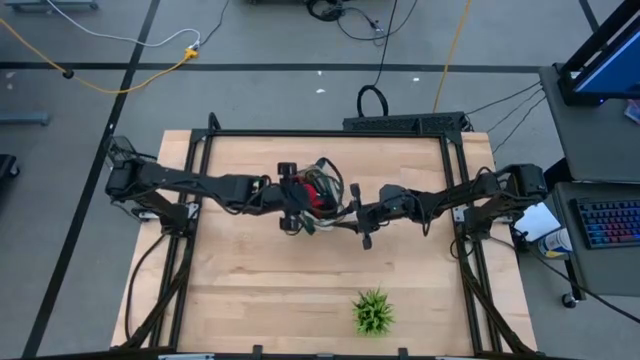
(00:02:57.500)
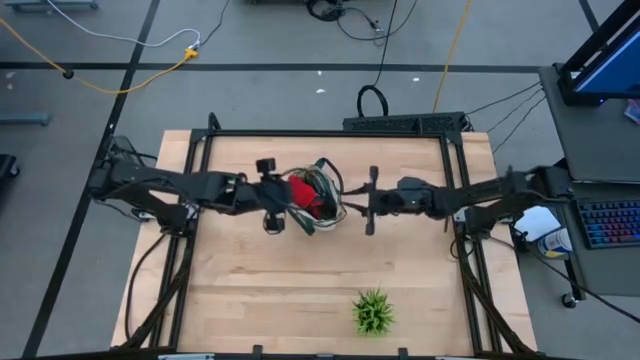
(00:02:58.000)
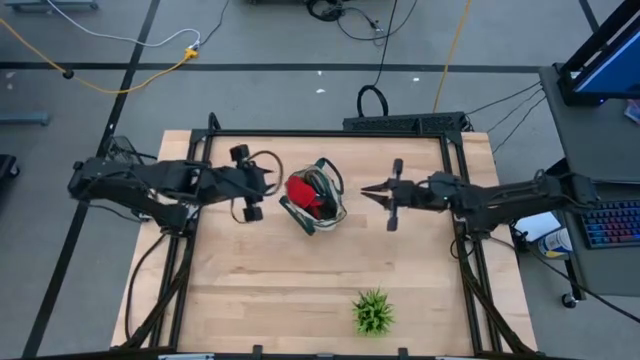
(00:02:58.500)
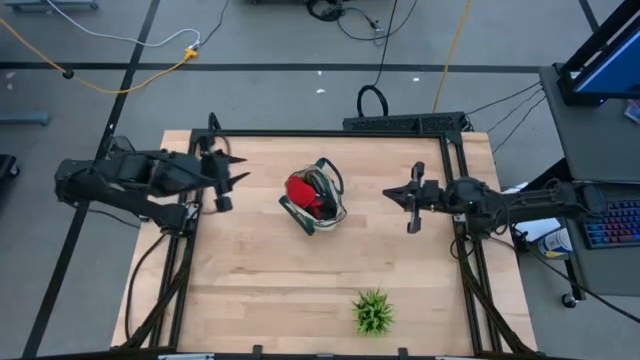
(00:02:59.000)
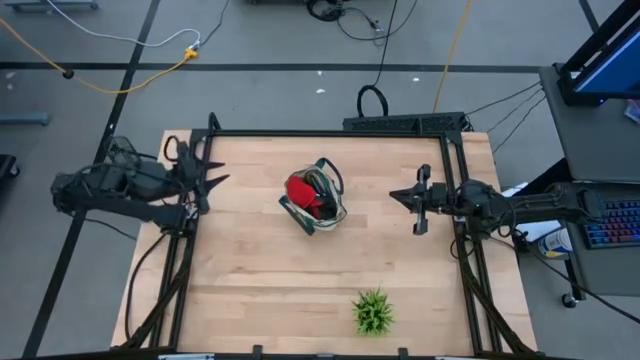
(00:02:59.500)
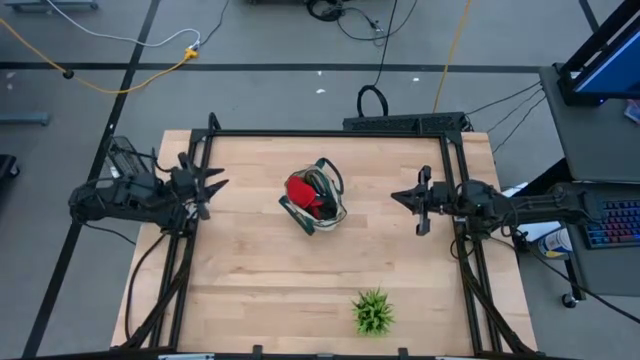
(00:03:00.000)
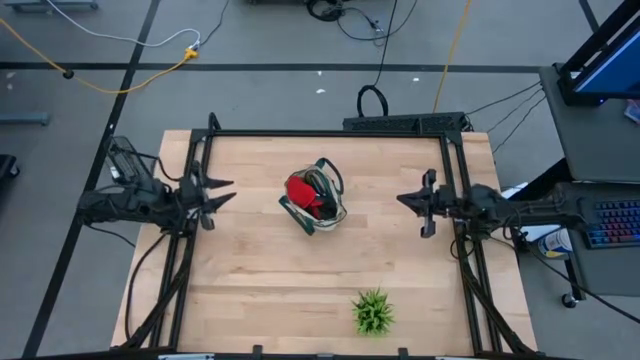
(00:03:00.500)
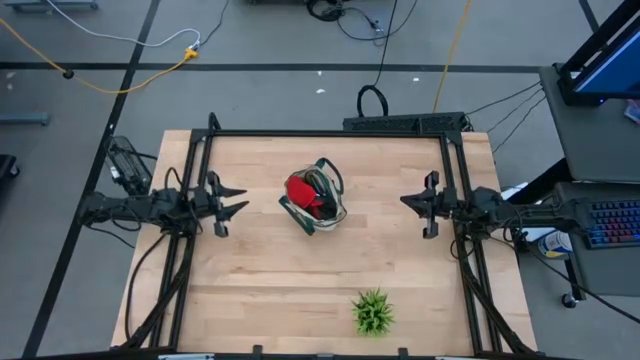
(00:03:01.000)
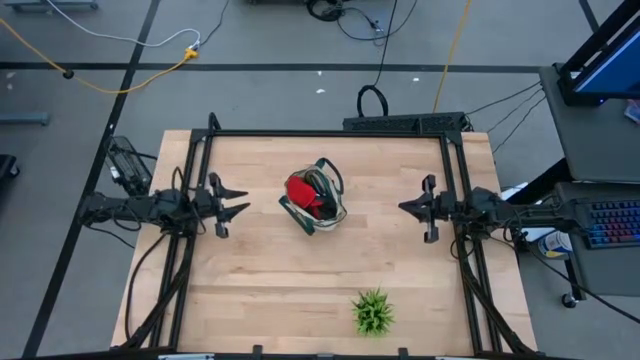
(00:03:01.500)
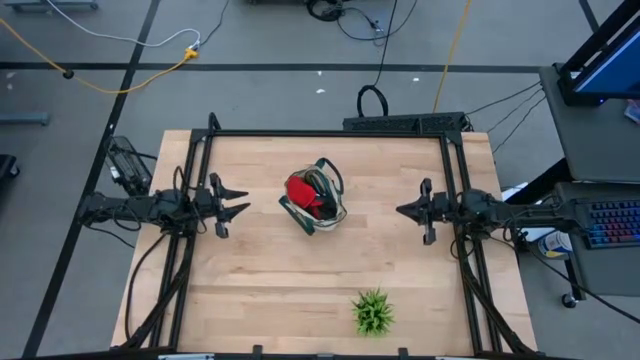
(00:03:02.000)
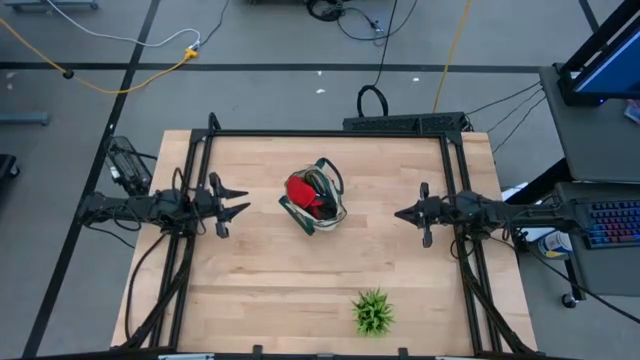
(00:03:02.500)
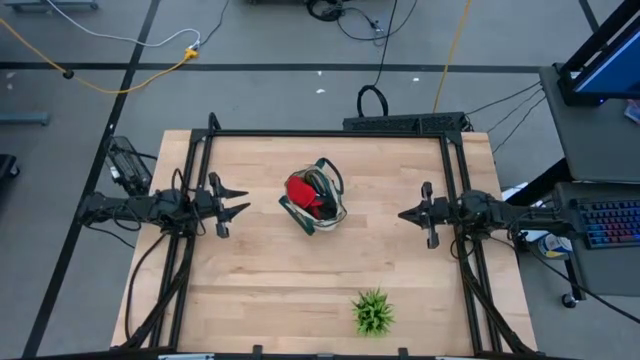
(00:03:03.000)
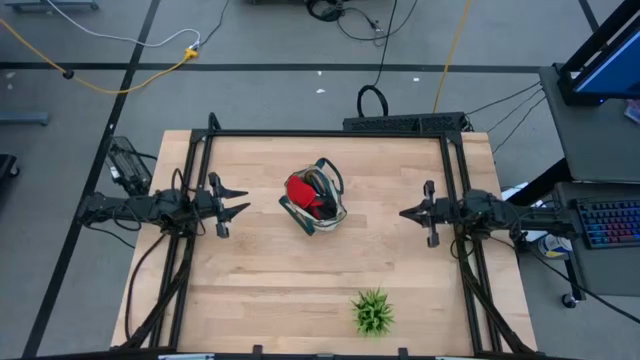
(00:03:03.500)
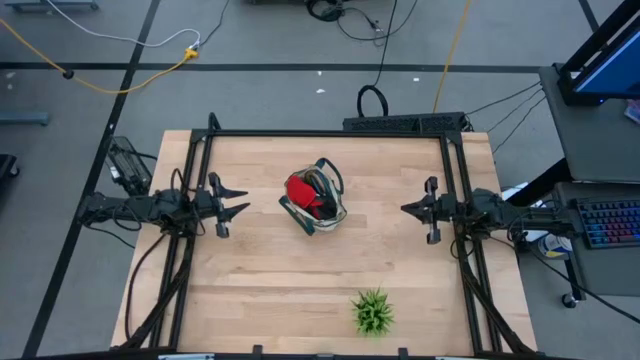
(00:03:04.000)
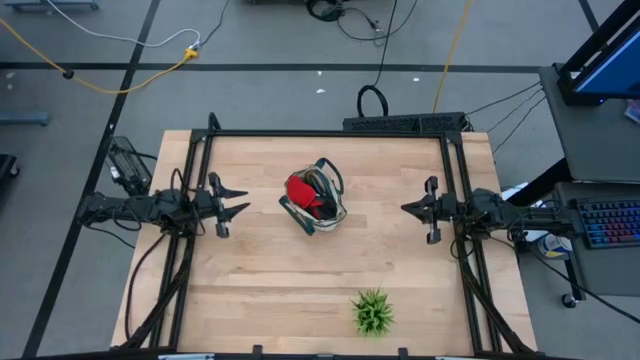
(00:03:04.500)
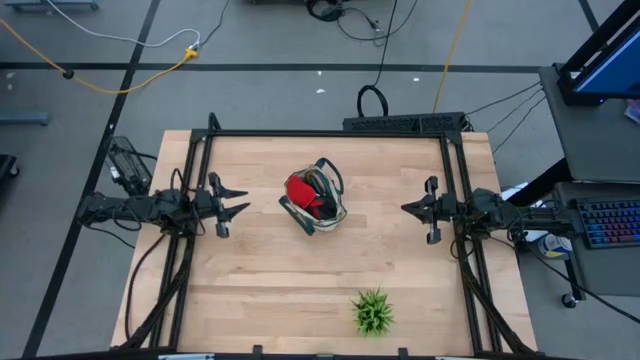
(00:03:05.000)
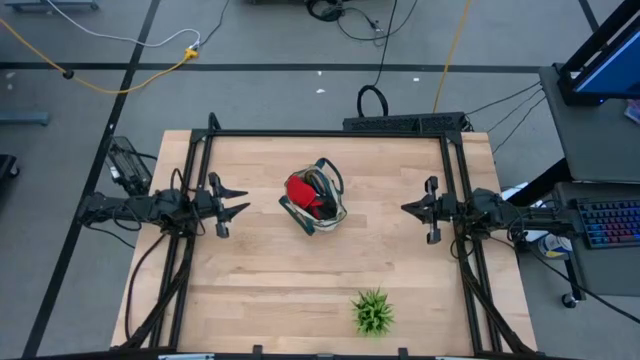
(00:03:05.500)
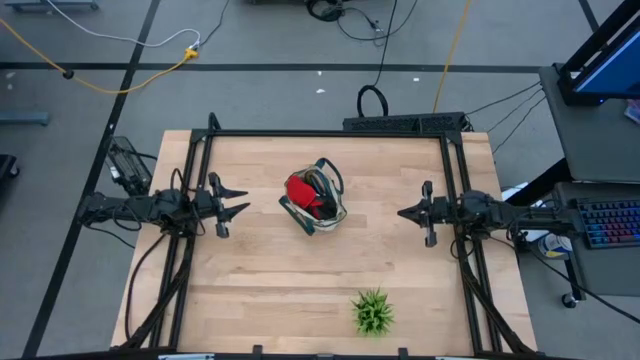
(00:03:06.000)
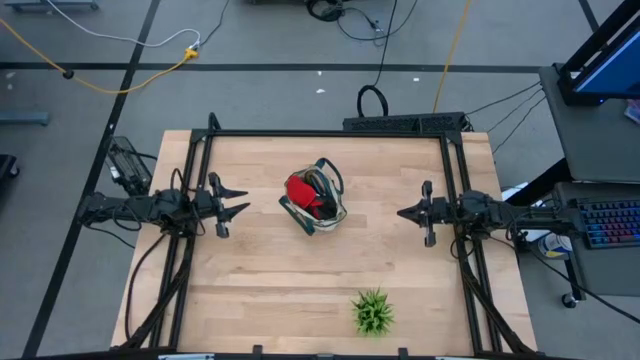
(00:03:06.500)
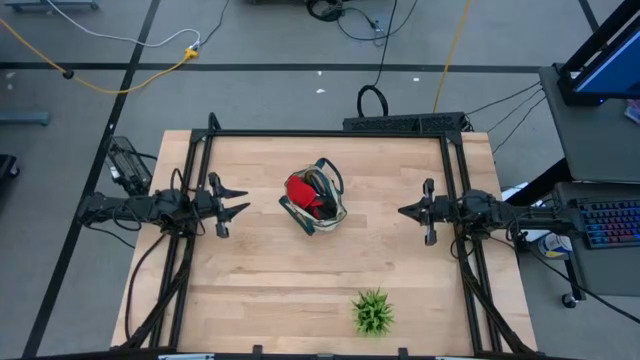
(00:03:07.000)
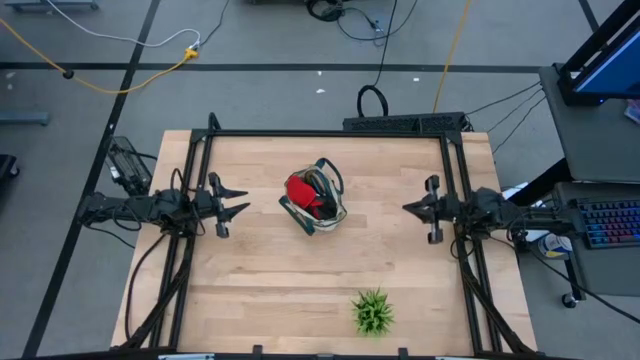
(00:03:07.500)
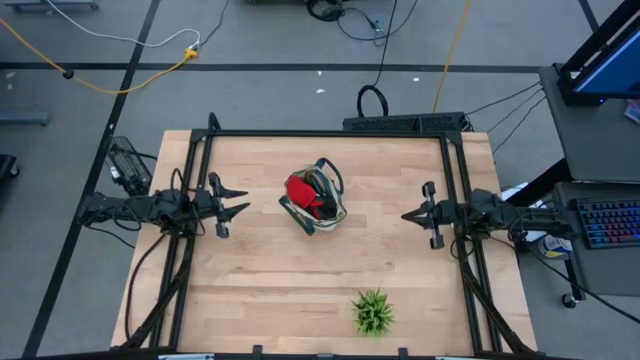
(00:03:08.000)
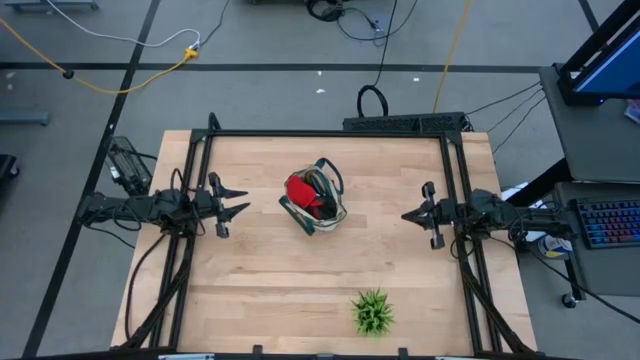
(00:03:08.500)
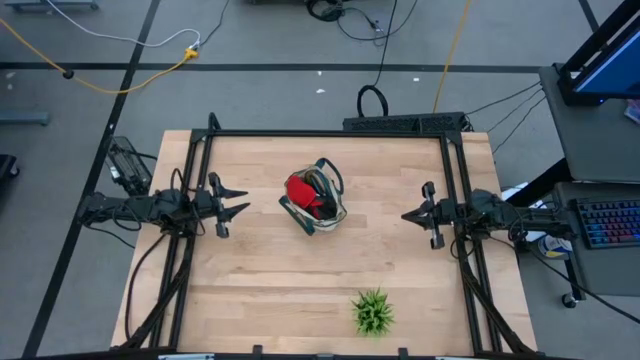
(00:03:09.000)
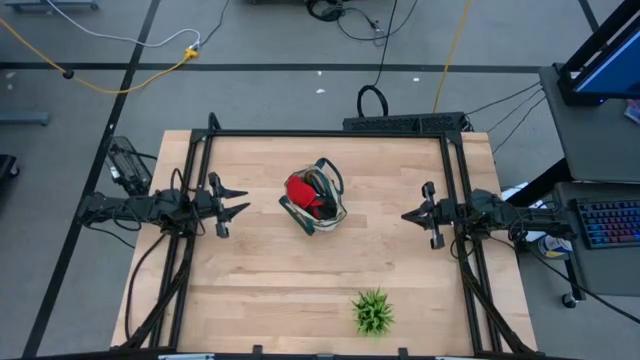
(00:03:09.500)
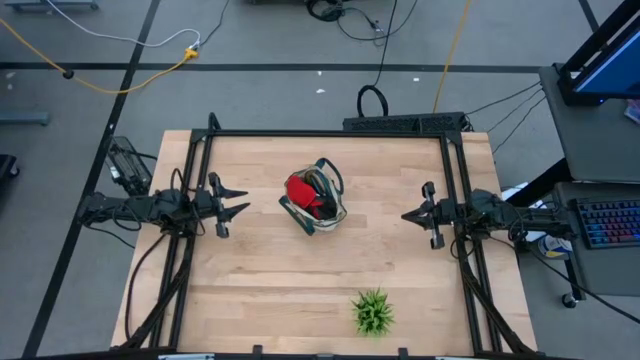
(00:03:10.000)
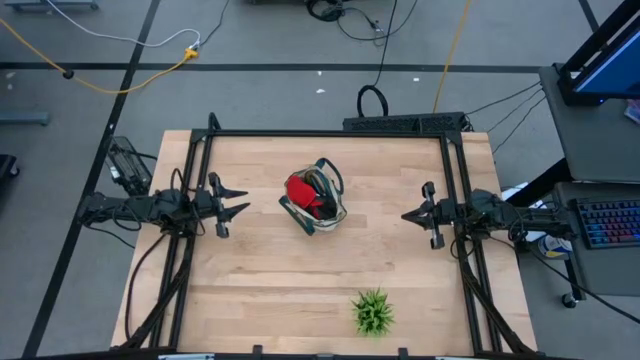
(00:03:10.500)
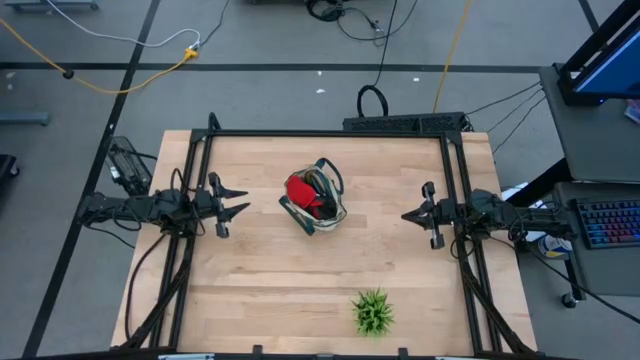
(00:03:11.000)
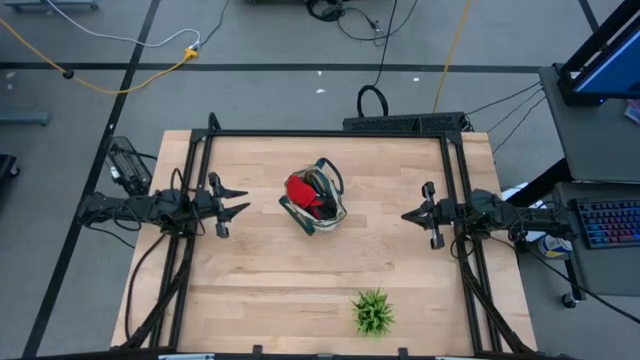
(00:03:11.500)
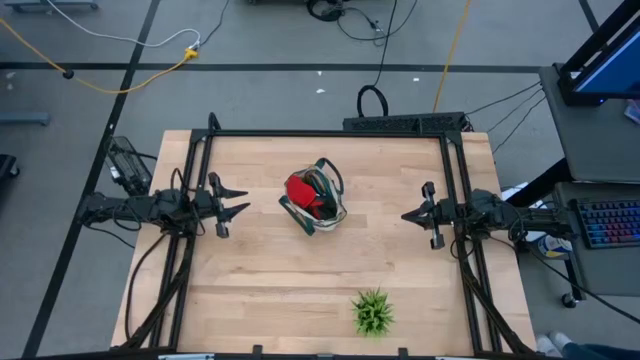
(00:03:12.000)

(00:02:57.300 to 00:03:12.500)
Task: Pick & Place Garden tools in Gardening bag
Return to Home Position

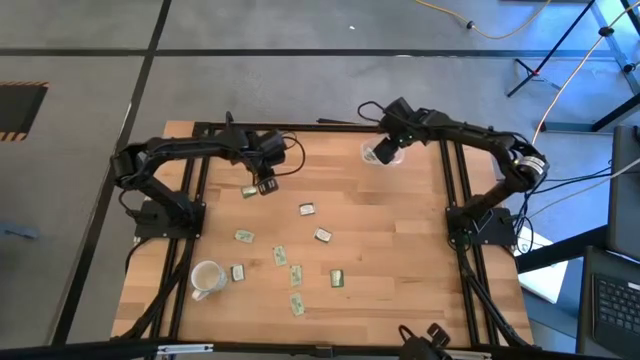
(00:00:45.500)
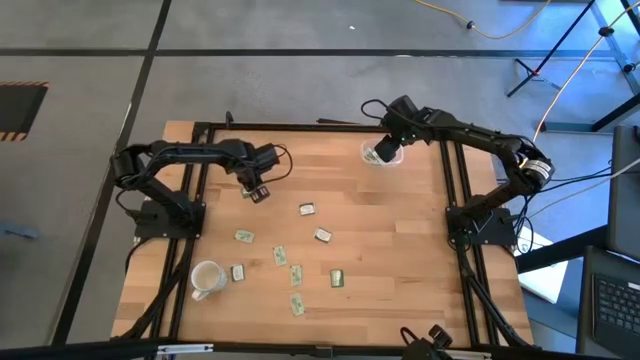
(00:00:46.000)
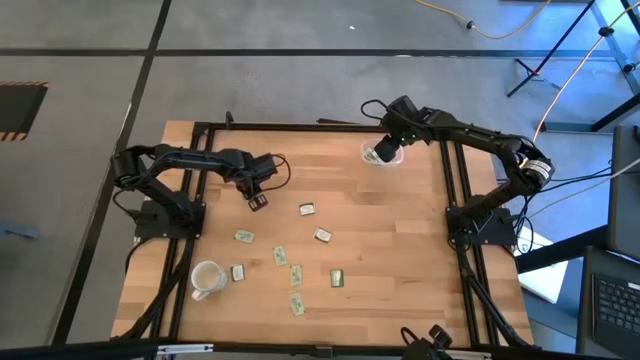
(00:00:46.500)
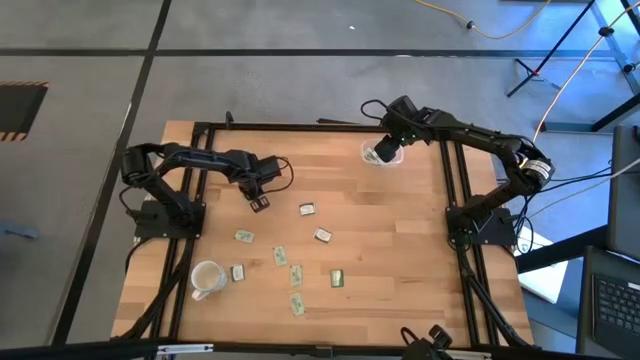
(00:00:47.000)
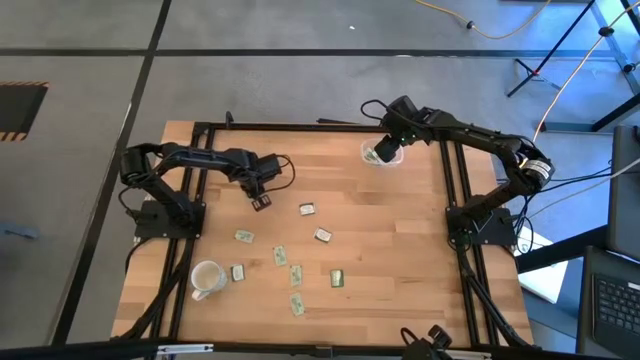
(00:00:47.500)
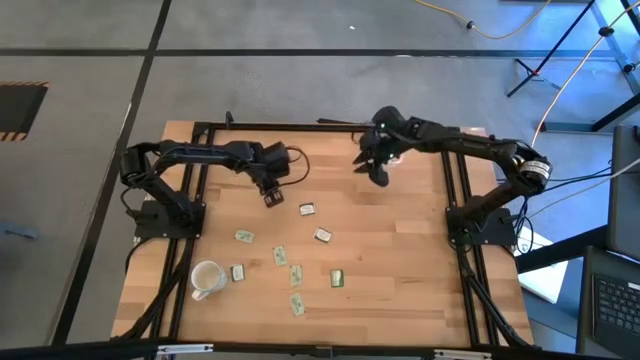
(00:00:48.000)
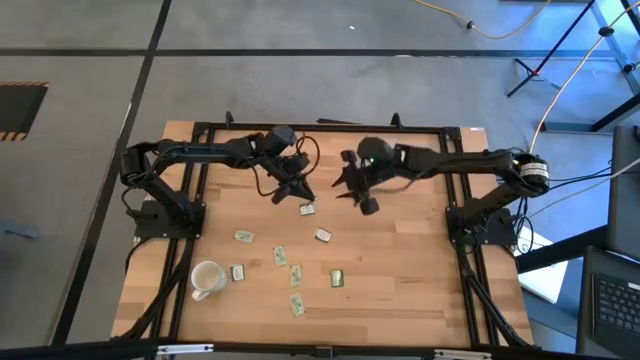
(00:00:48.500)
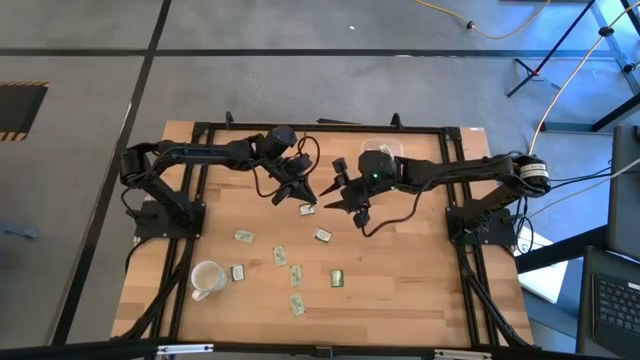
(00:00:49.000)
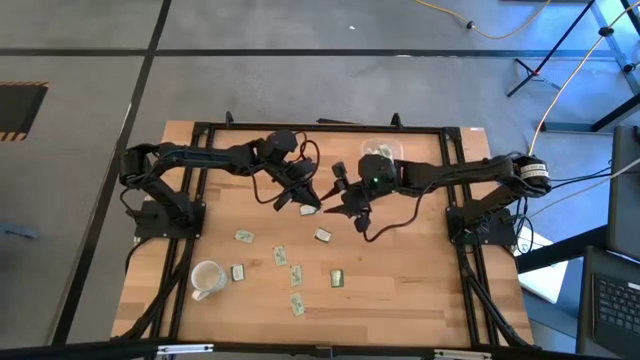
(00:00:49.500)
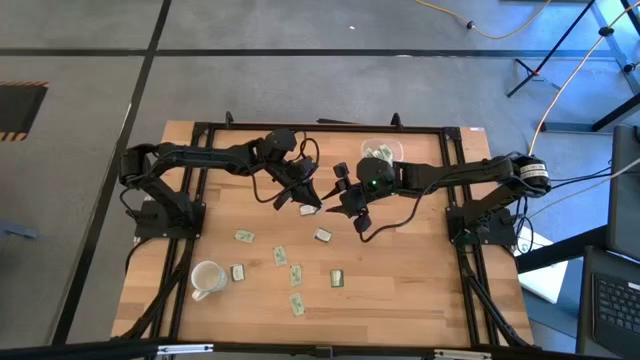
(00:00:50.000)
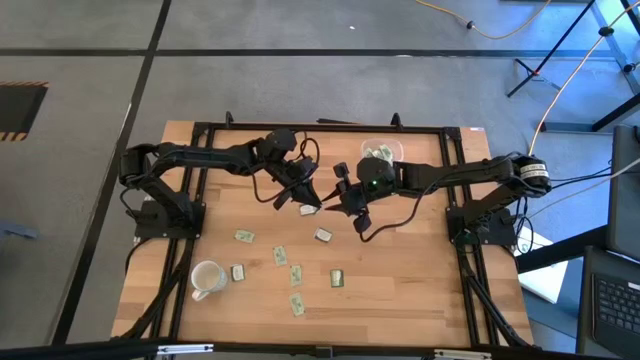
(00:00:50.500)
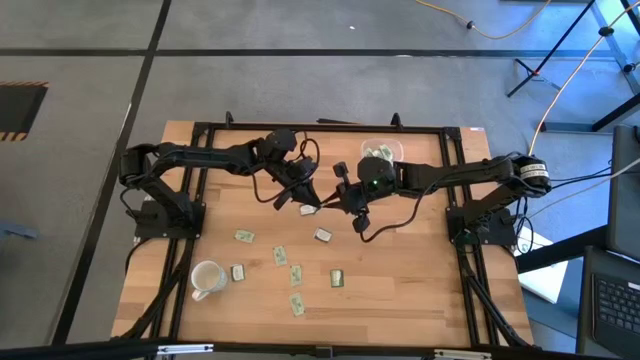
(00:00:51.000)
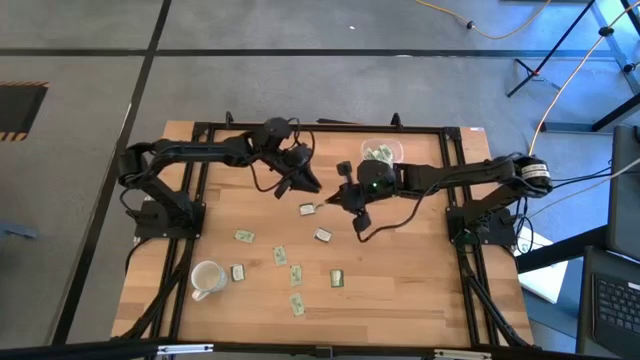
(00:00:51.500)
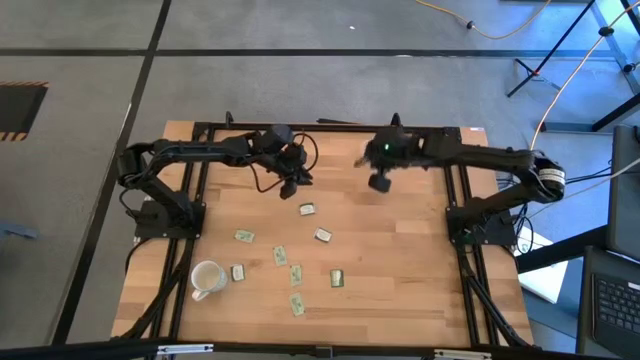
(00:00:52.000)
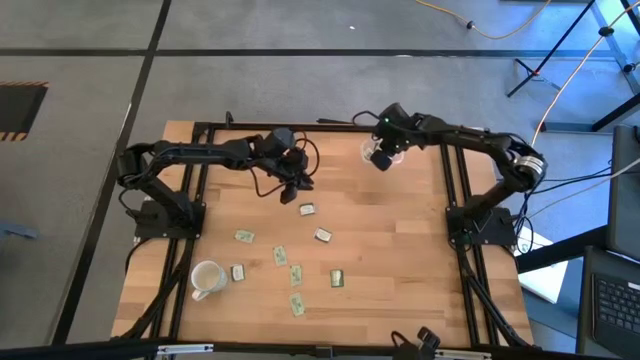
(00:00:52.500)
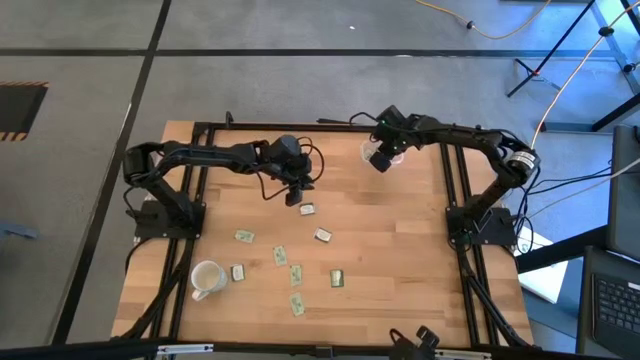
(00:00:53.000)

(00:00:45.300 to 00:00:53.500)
Task: Pick and place Stevia / Truvia into bins
Put the dark green truvia packet into the transparent container
